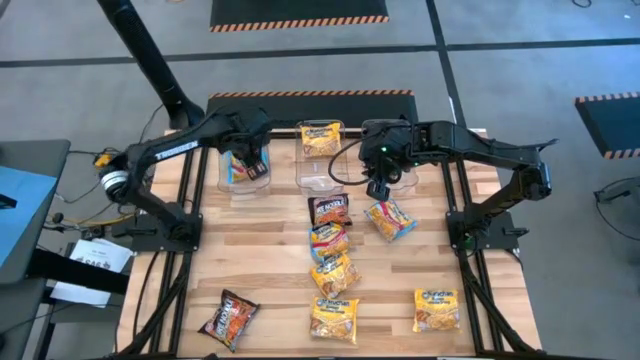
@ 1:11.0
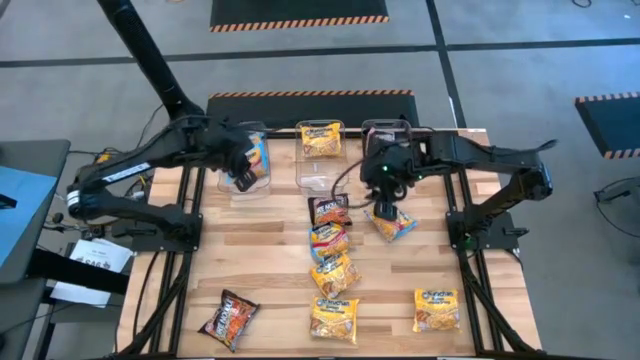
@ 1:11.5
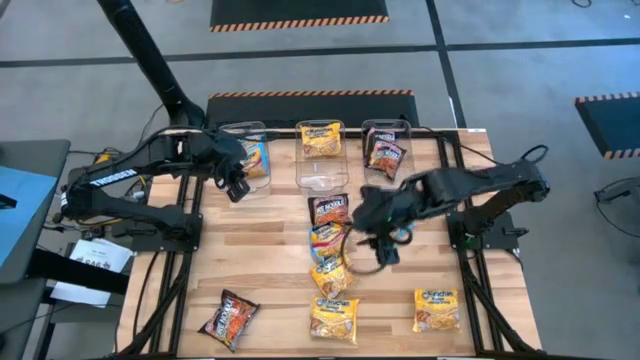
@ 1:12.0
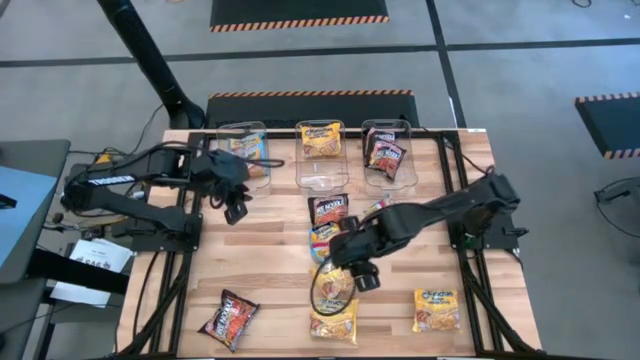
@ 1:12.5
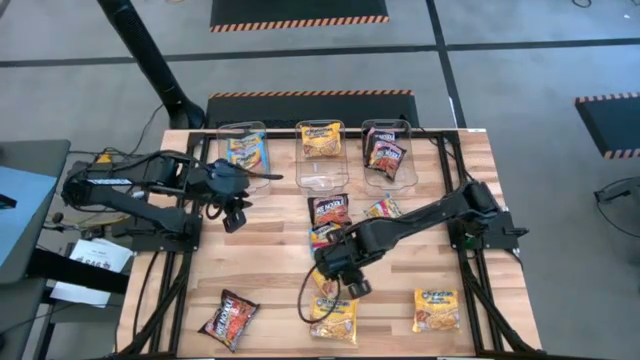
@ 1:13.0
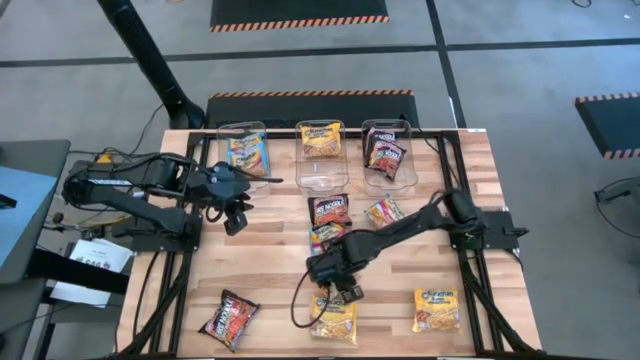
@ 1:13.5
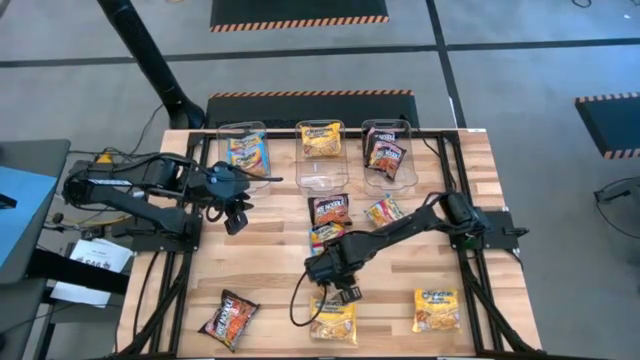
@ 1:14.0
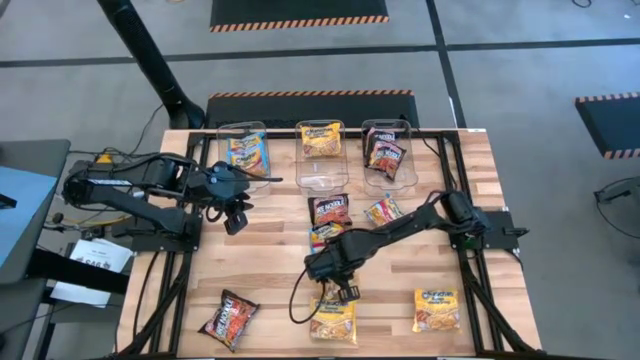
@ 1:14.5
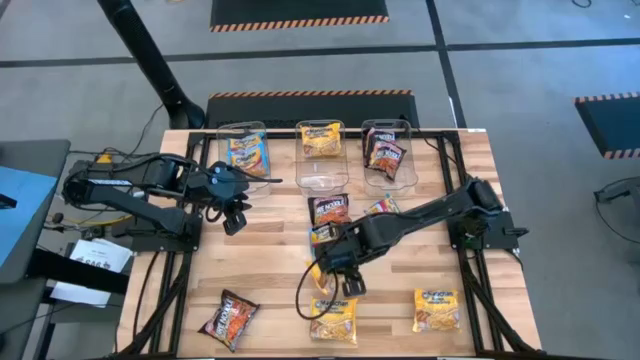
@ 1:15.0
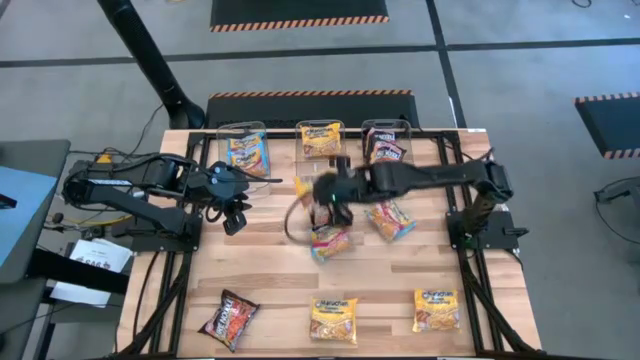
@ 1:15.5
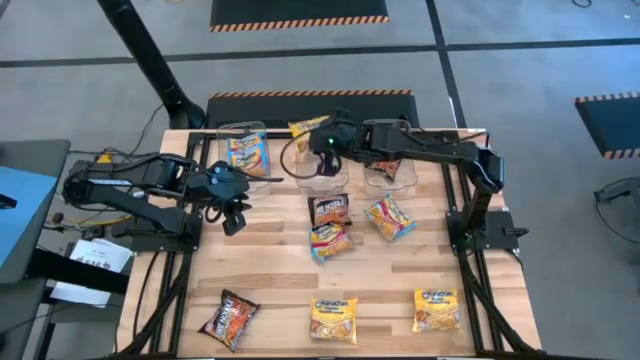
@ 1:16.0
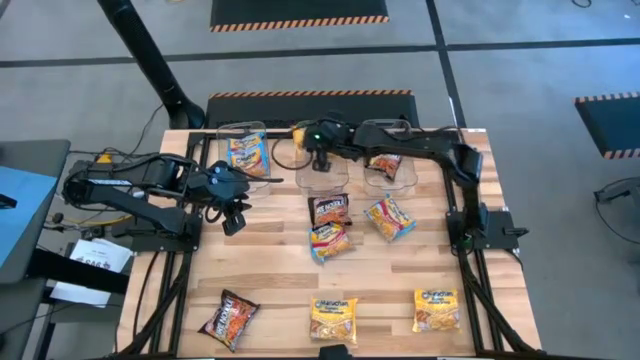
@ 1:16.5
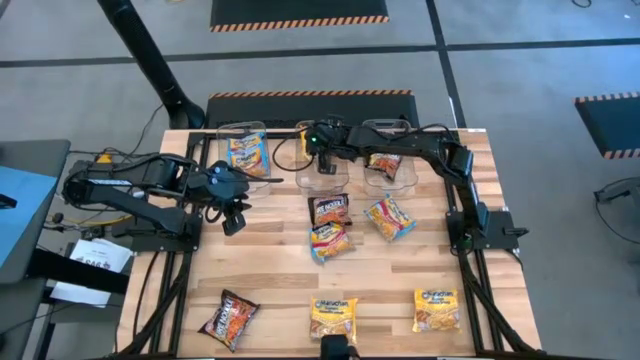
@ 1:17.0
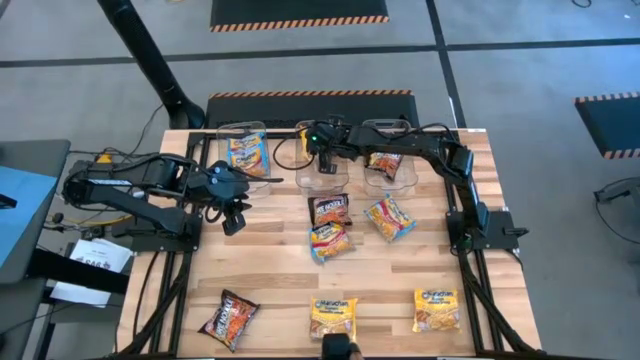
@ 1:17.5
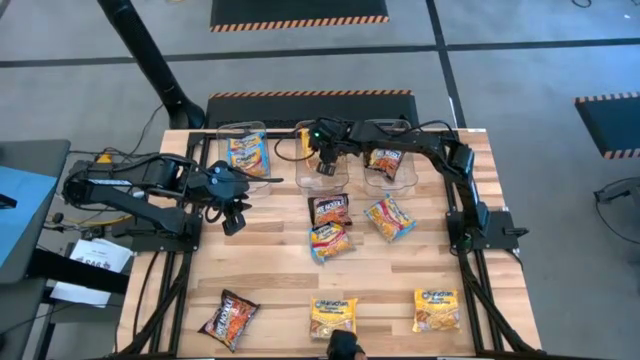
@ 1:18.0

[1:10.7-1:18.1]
Task: Sort Maruchan noodles
Put the yellow noodle pack into the middle transparent bin

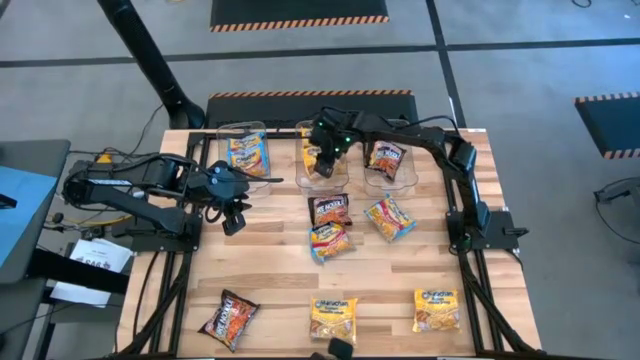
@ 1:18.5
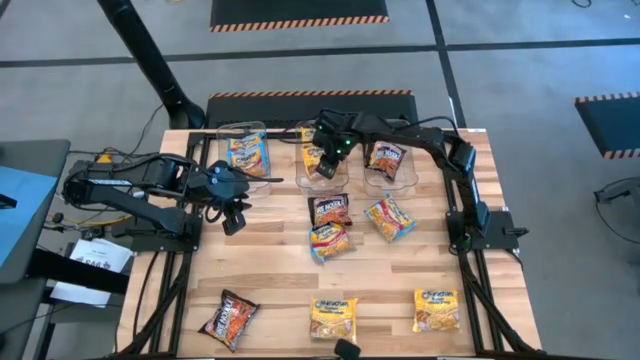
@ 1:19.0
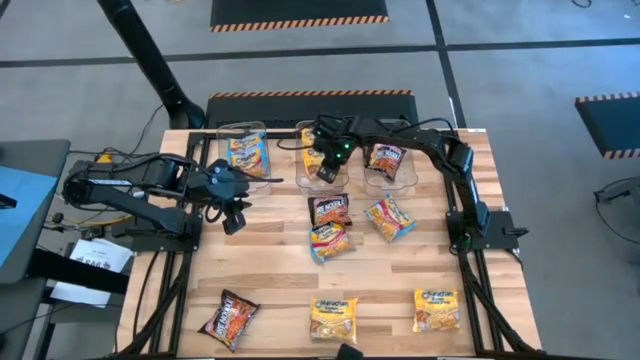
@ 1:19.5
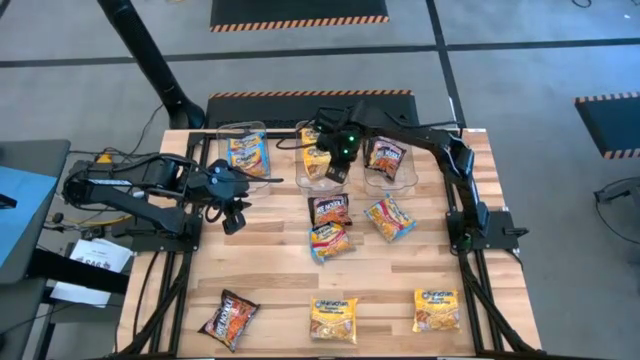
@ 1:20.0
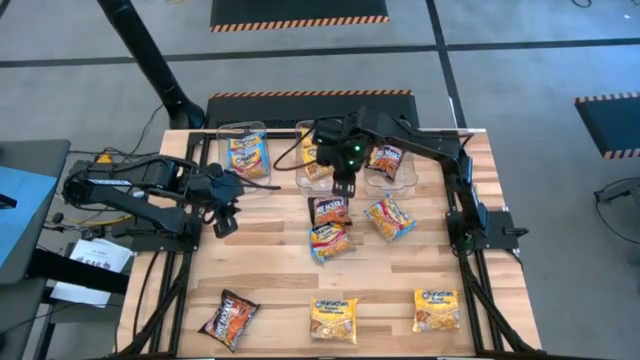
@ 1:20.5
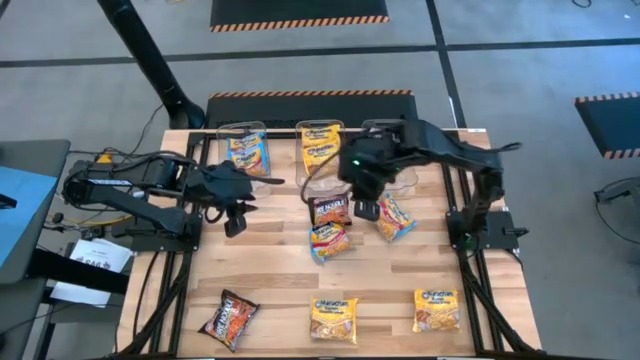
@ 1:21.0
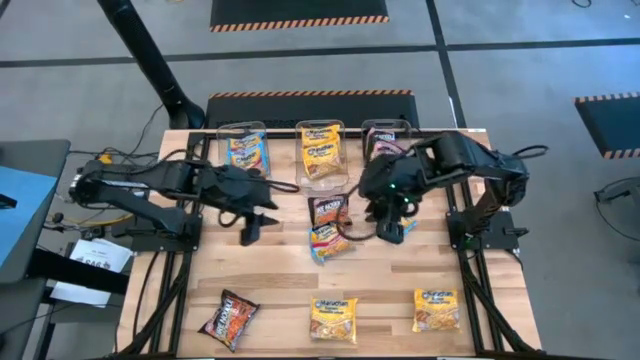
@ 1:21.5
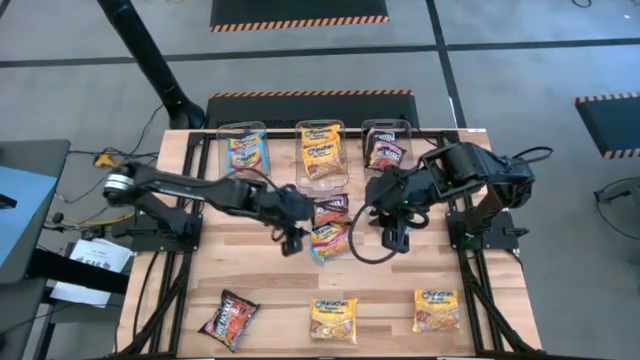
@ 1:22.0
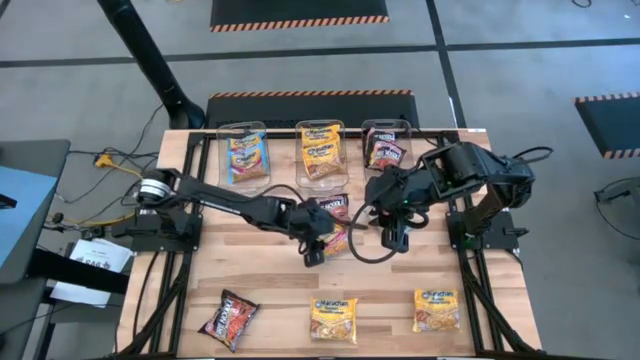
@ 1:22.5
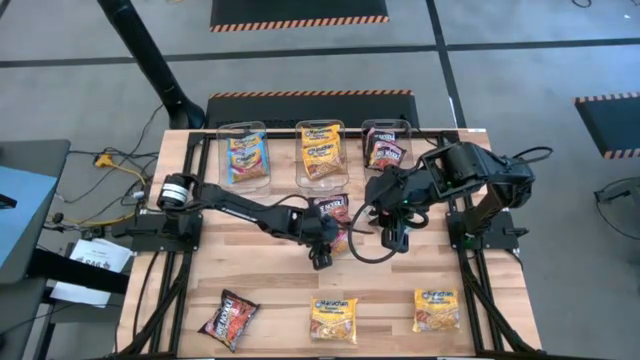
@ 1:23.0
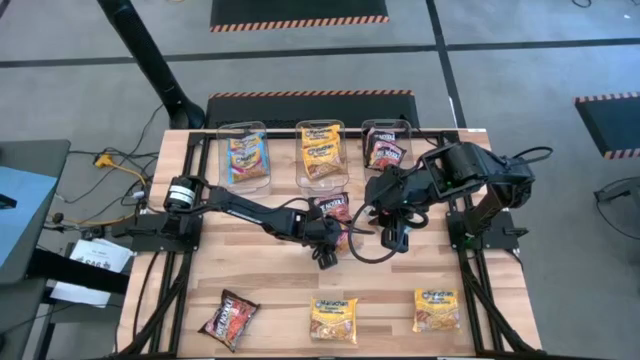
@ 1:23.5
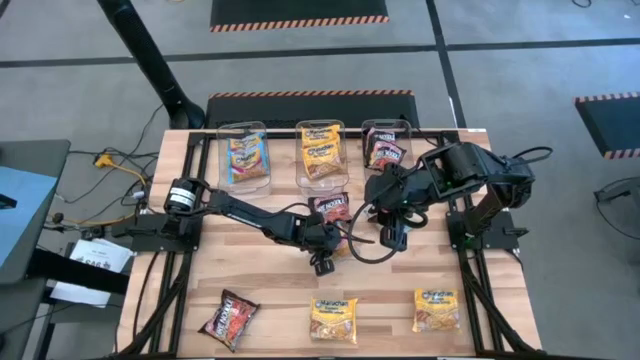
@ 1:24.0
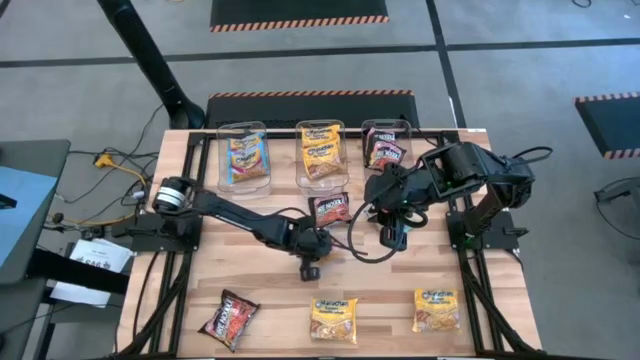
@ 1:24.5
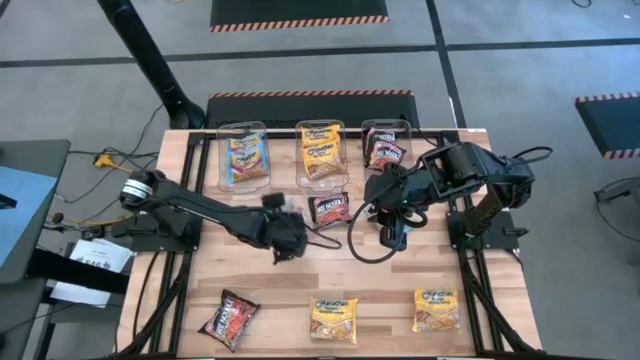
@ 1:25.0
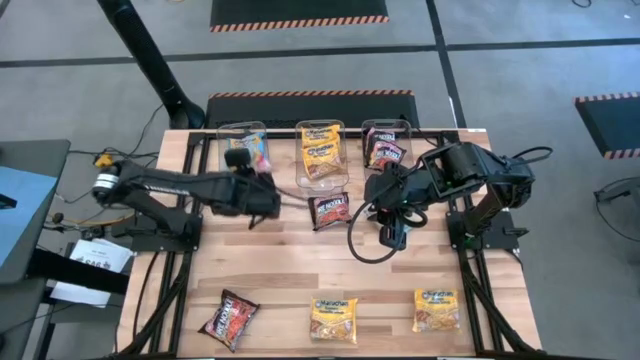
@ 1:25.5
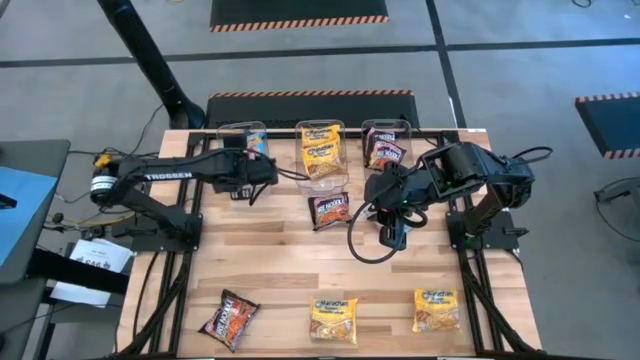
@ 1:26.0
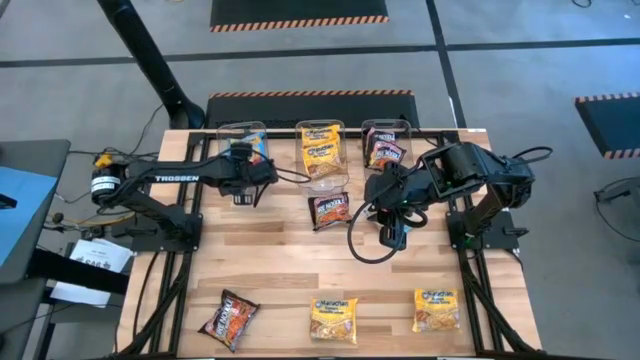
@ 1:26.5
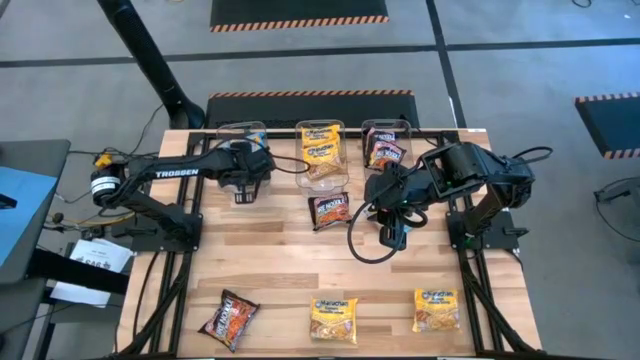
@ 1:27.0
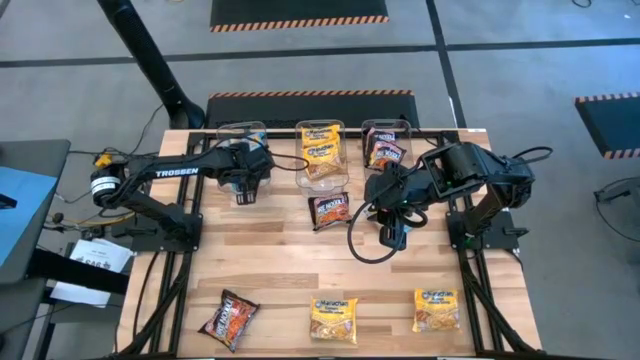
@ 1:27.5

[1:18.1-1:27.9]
Put the blue noodle pack into the left transparent bin

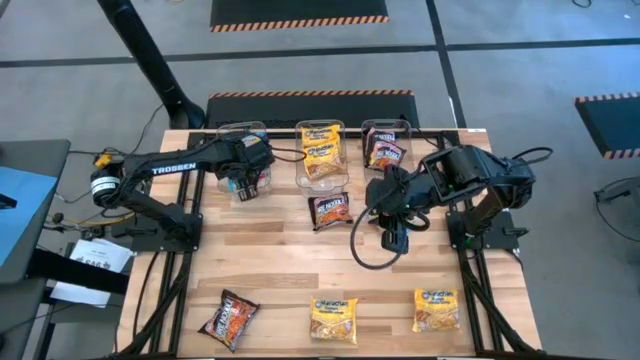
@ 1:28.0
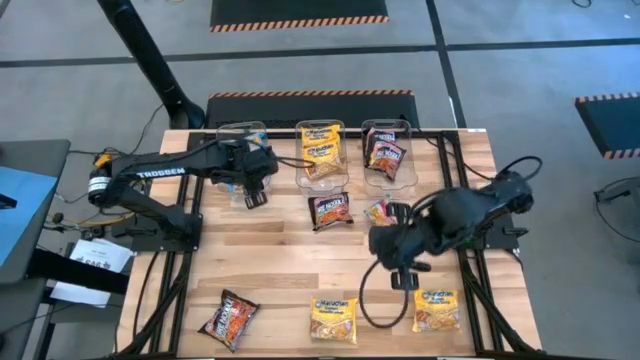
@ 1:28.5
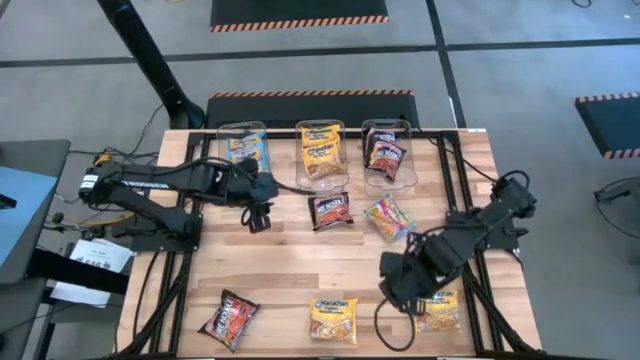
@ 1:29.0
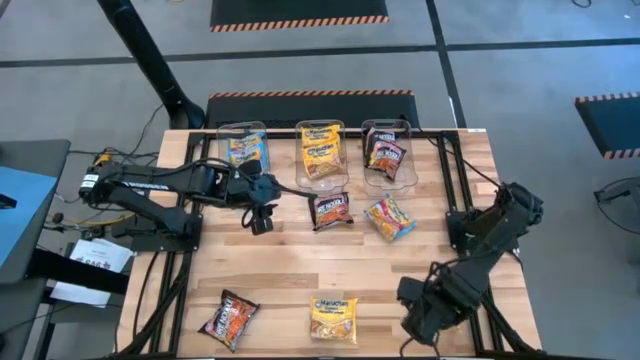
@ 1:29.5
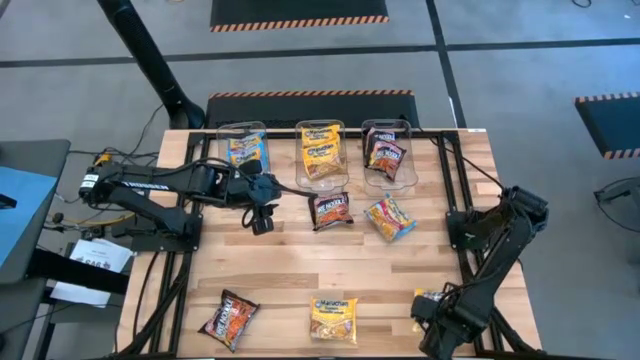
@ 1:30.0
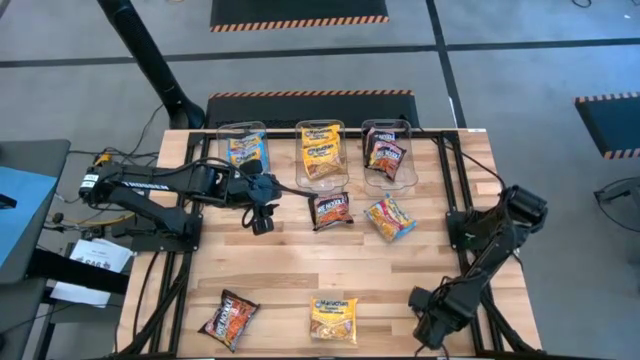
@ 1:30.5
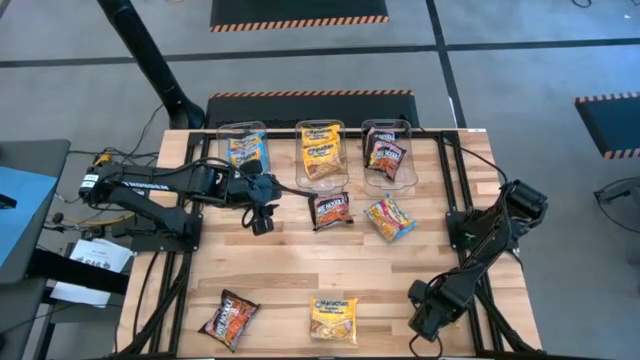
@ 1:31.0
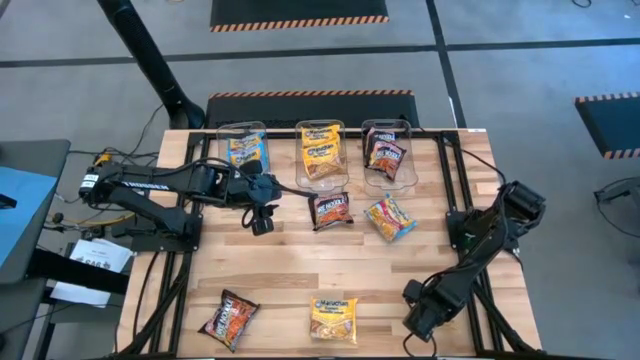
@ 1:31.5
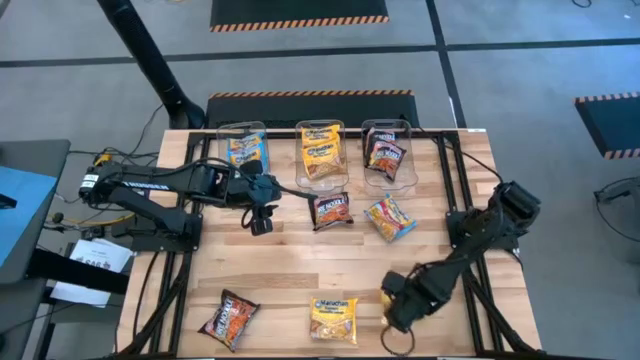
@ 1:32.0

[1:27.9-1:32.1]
Put the yellow noodle pack into the middle transparent bin

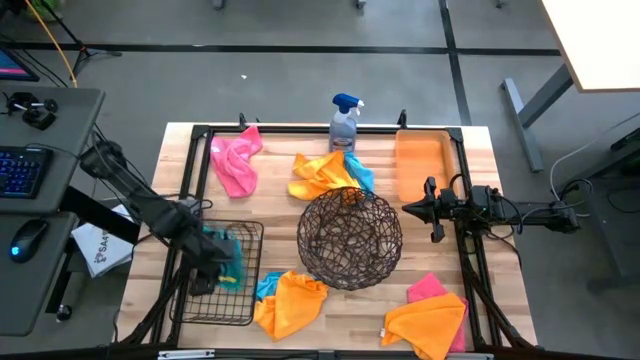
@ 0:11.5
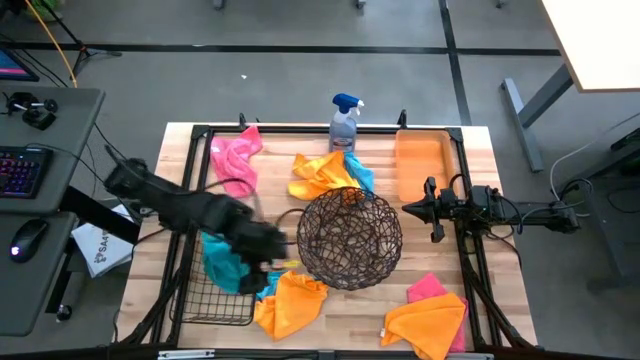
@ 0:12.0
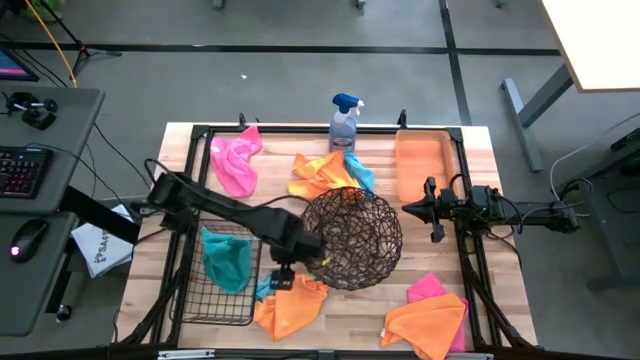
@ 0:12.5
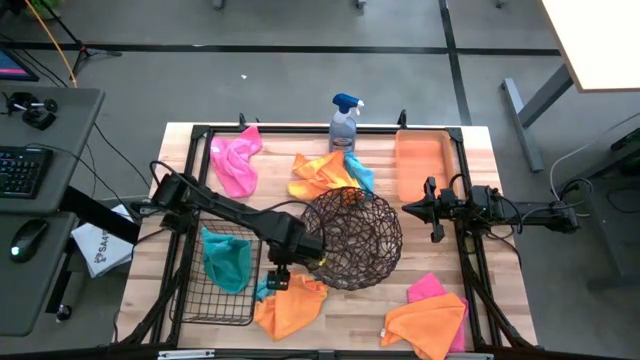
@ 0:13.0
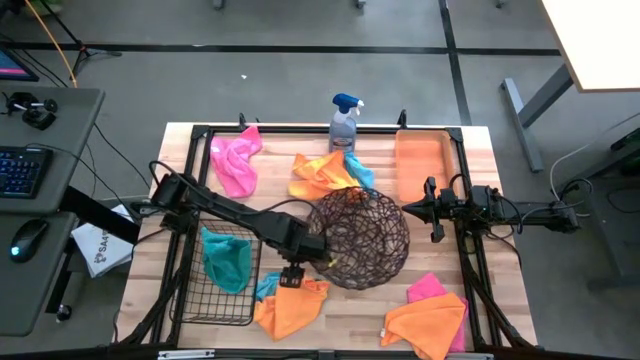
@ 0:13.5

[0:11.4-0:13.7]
Task: Sort microfiber towel by color & place in baskets
Adjust the woven basket
